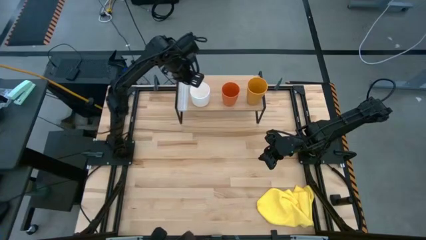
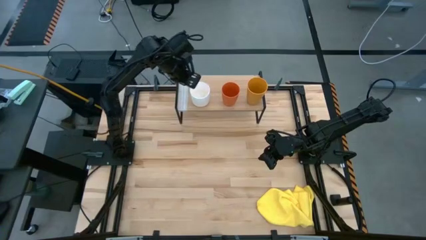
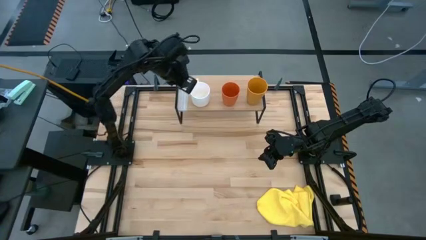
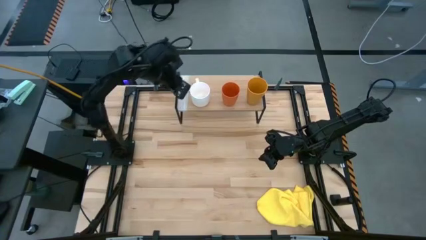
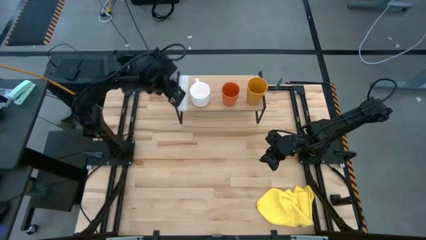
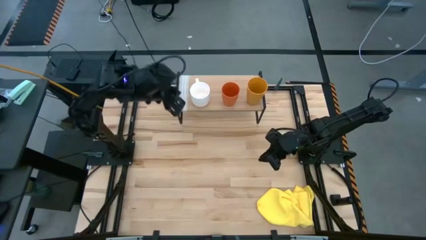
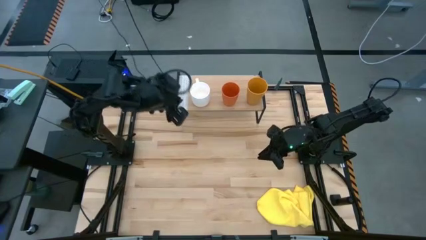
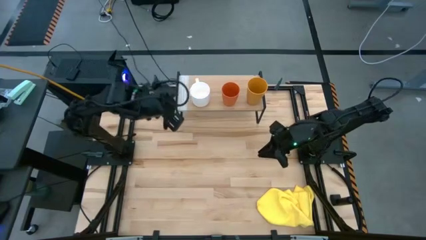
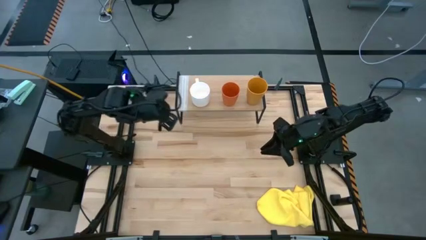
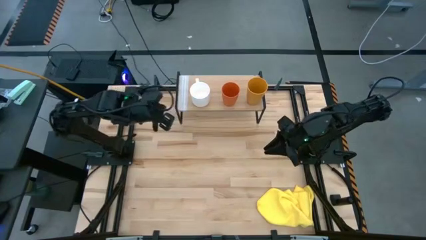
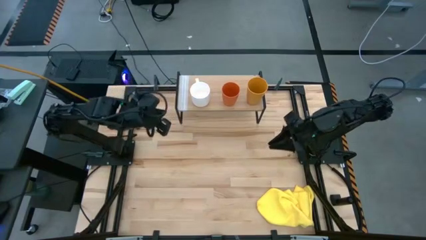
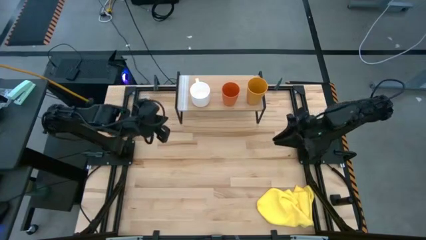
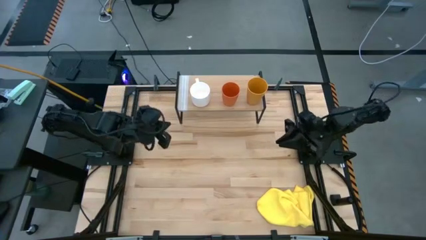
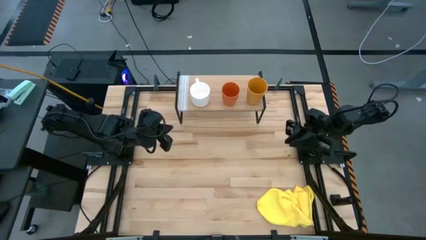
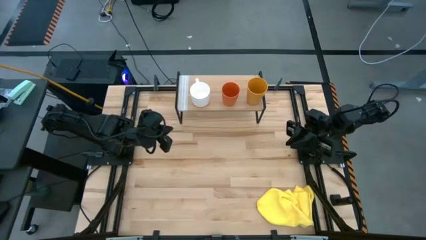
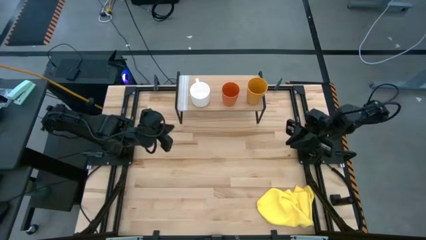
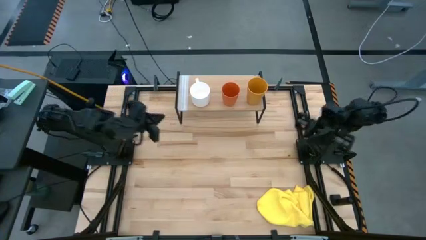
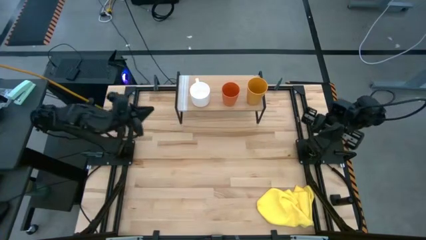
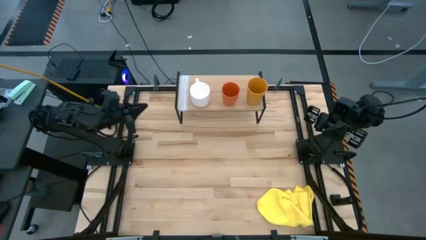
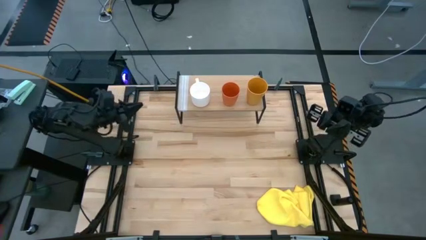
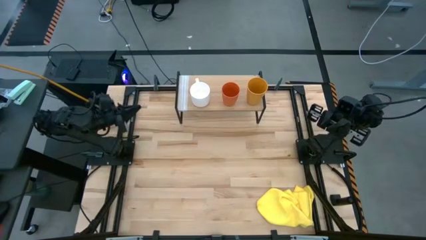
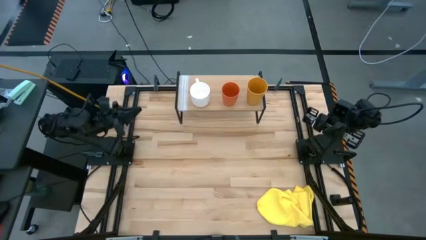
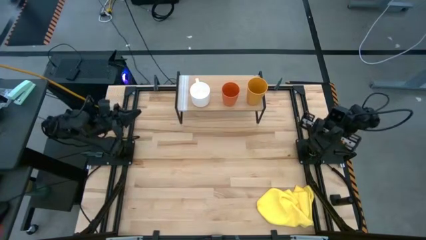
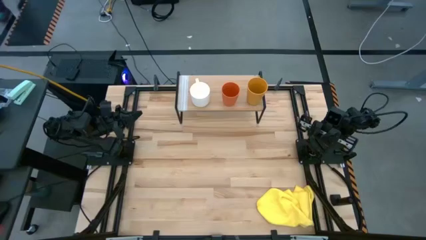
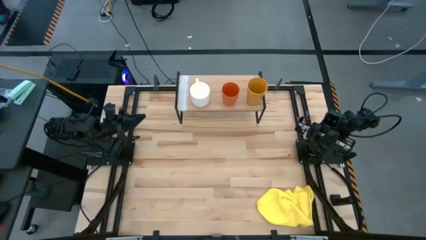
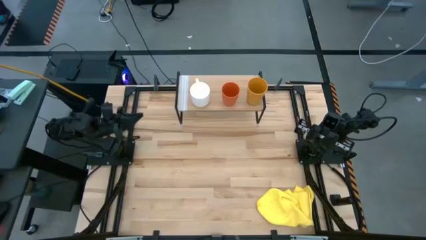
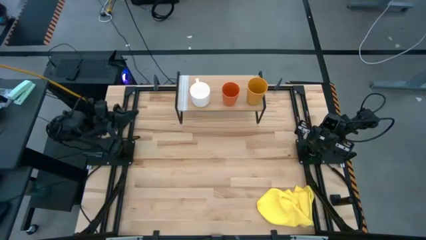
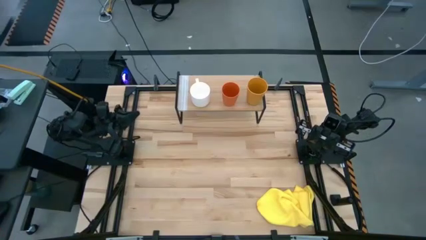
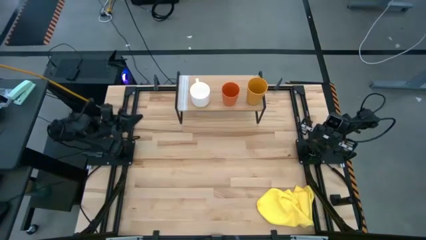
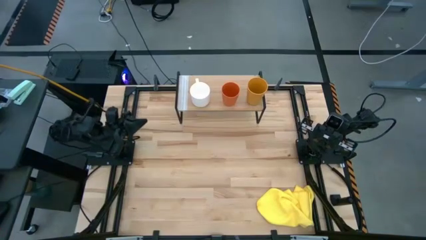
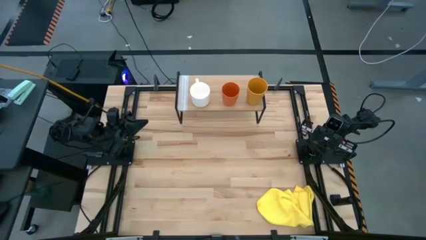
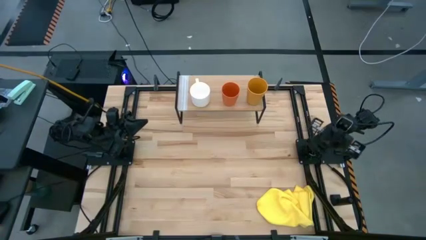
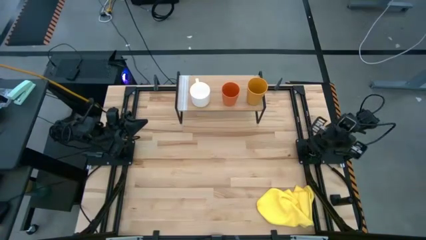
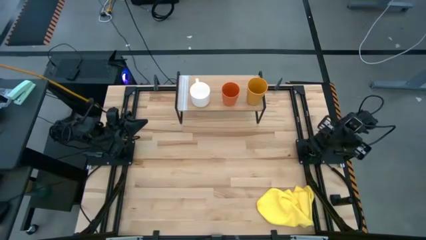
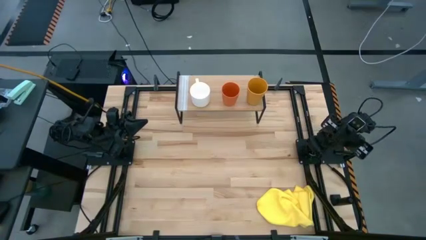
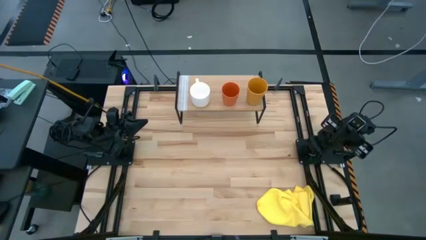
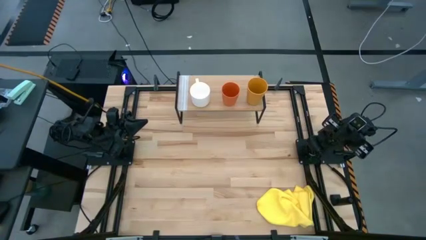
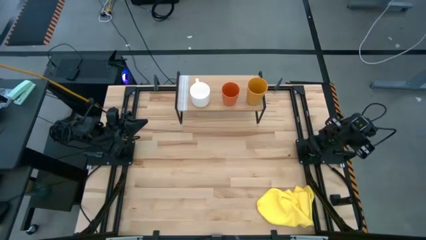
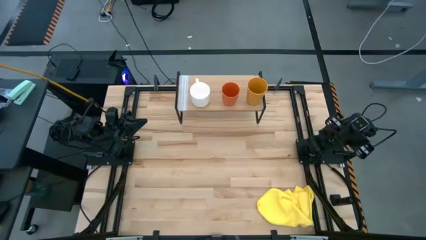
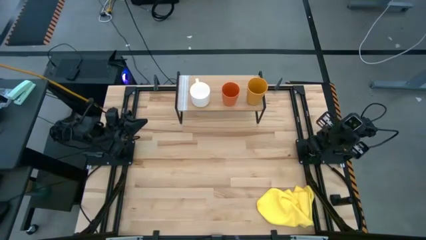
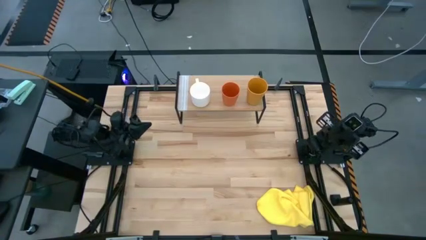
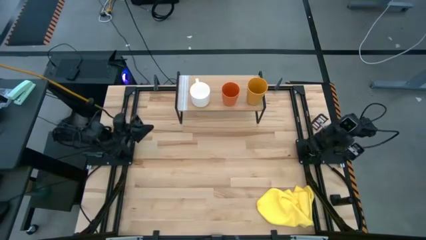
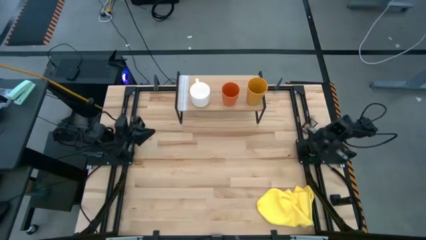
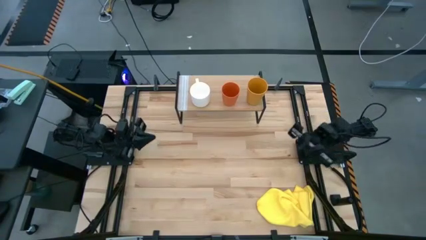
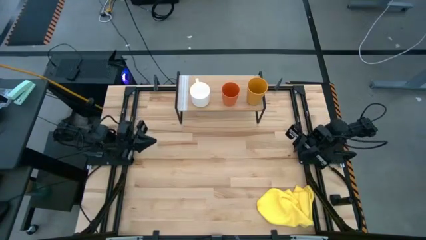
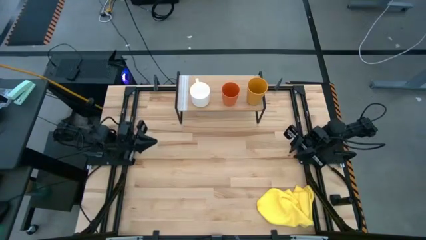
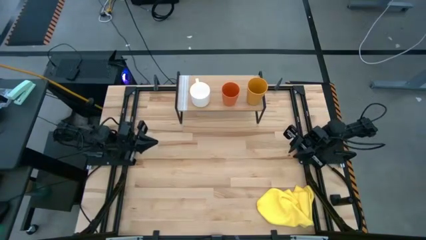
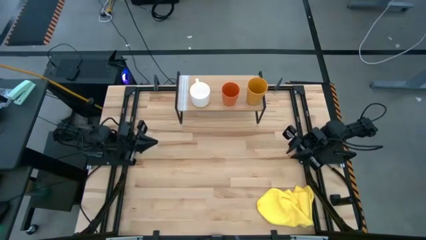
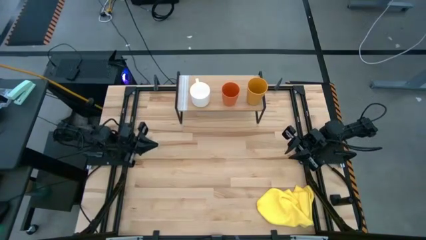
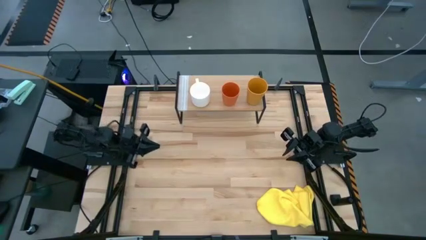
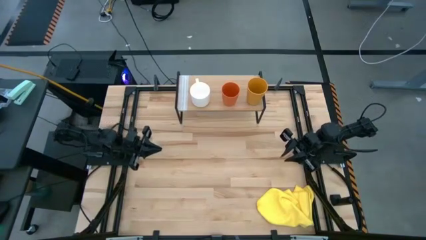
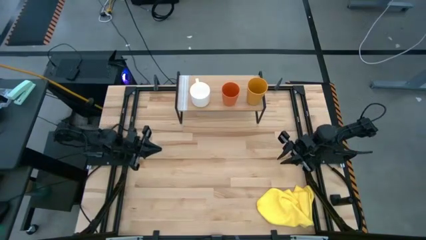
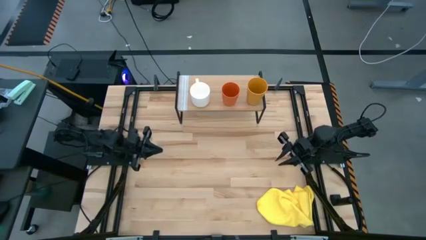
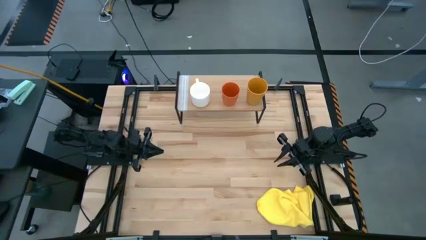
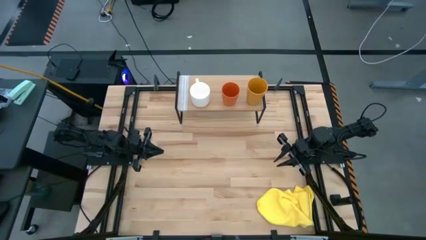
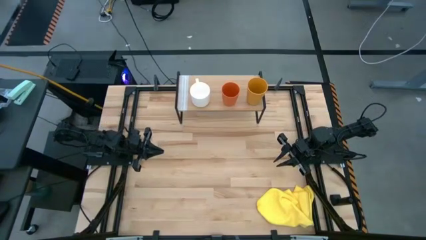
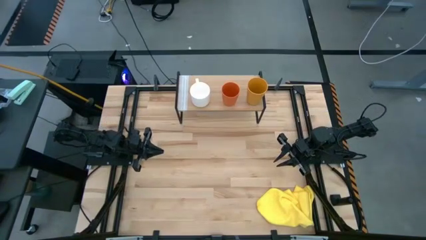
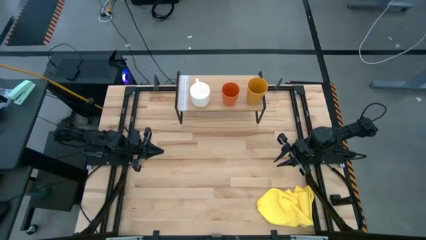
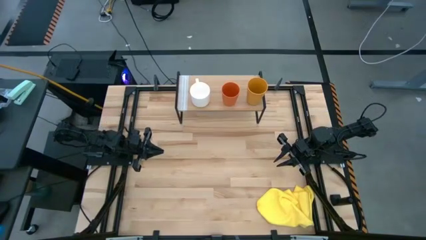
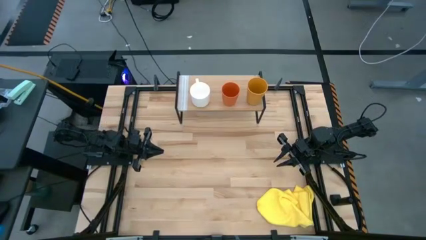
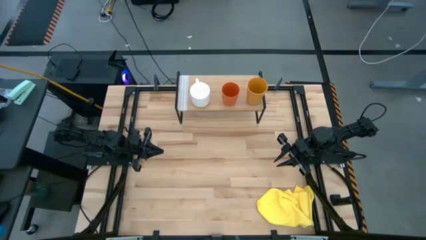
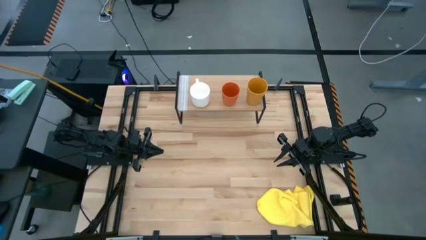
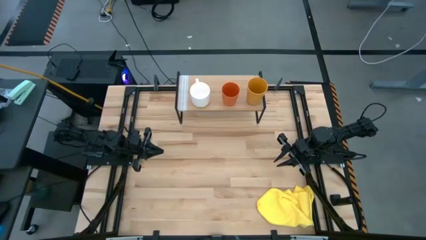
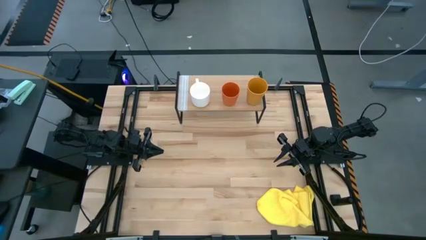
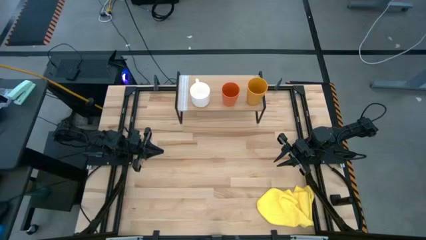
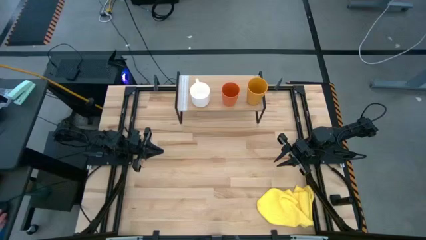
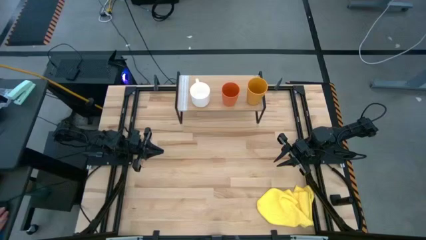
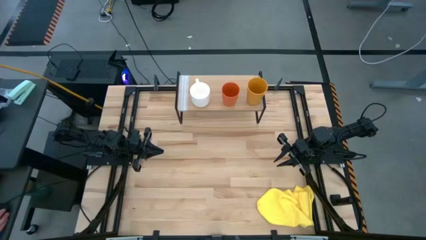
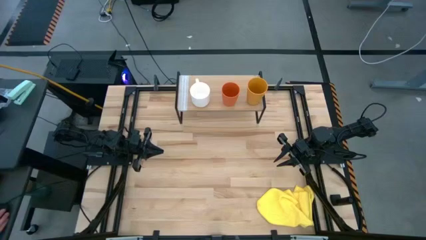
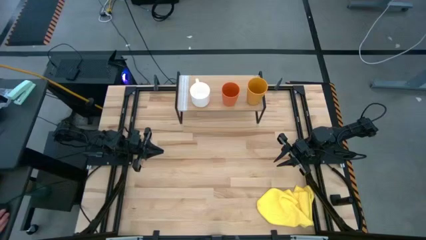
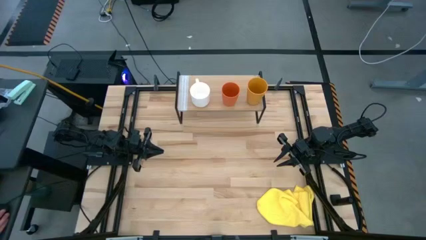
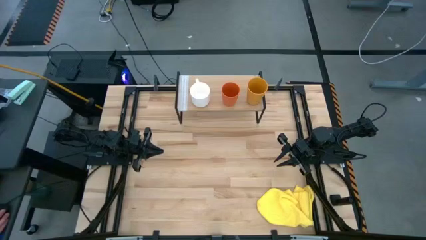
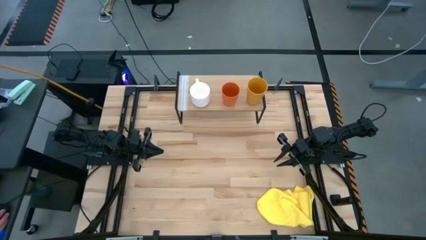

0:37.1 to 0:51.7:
Task: Stack small to large cups/mugs on shelf
Return to Home Position

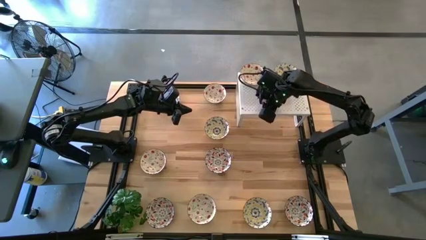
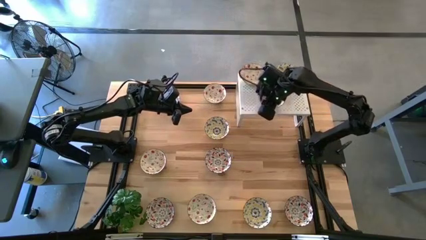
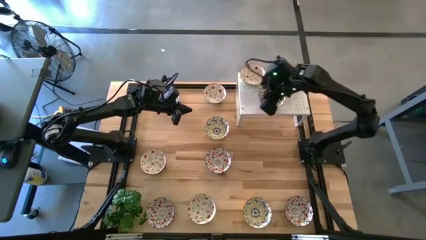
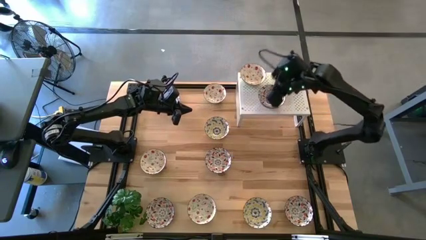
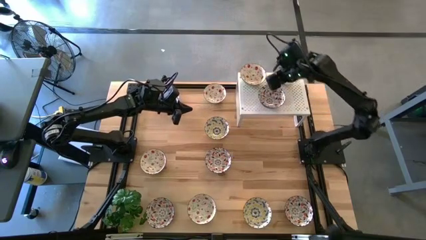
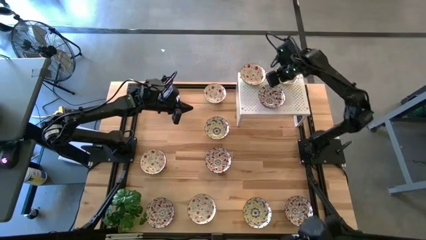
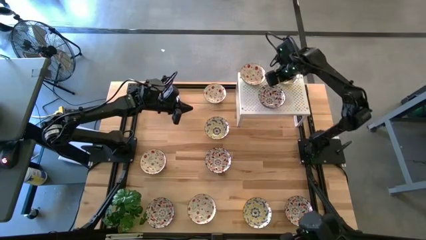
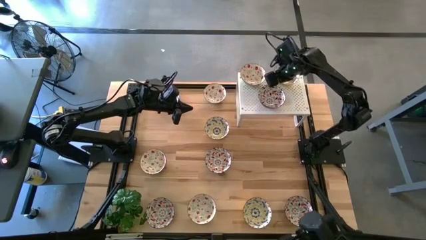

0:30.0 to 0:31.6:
Task: Pick & Place Mini bowls
Adjust the yellow bowl on the shelf
